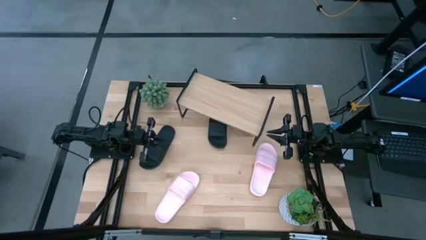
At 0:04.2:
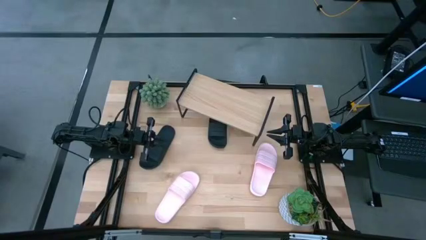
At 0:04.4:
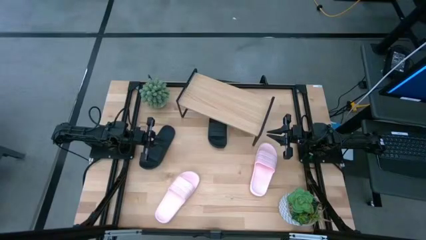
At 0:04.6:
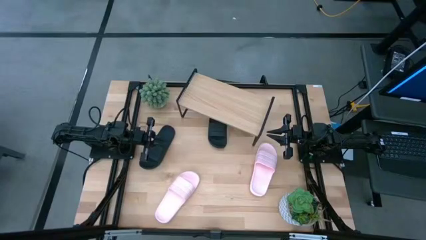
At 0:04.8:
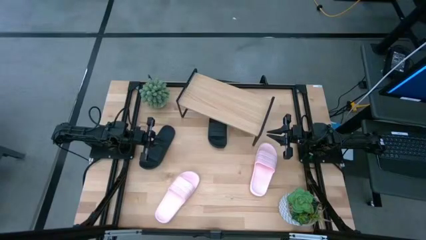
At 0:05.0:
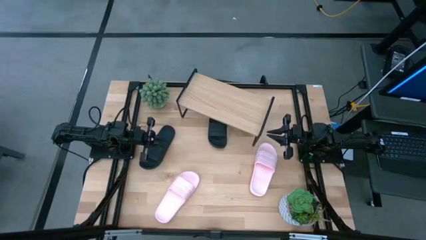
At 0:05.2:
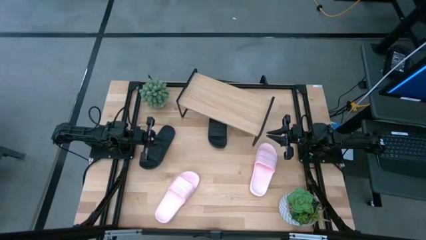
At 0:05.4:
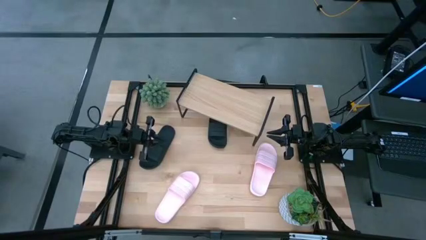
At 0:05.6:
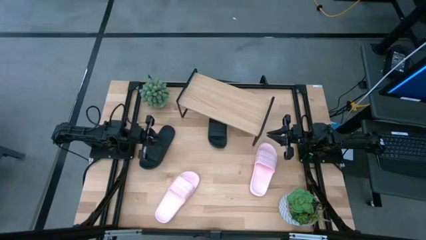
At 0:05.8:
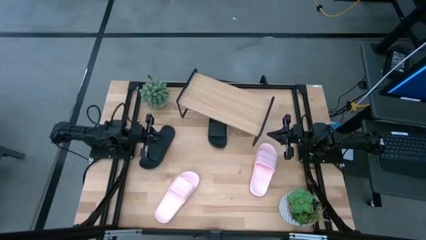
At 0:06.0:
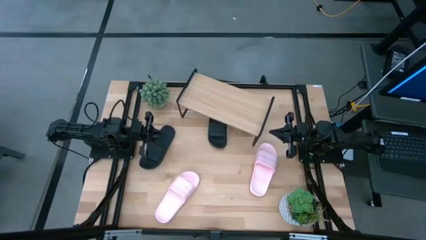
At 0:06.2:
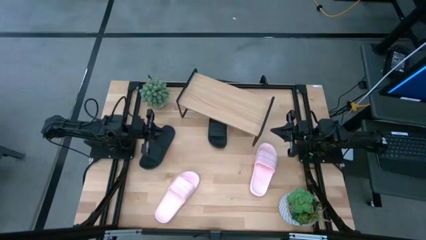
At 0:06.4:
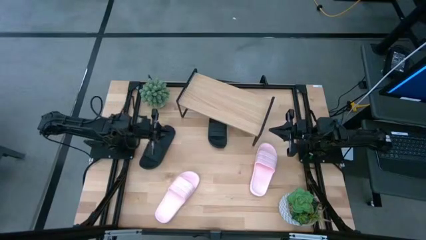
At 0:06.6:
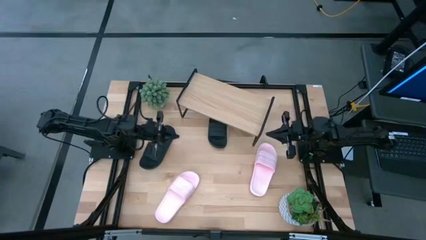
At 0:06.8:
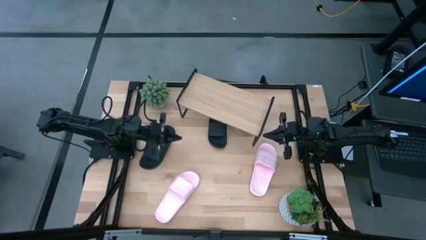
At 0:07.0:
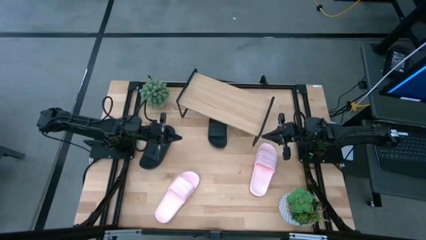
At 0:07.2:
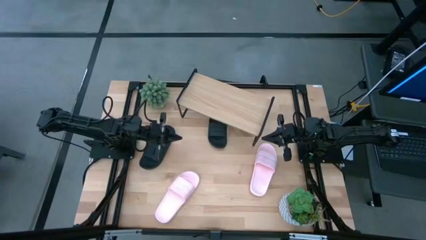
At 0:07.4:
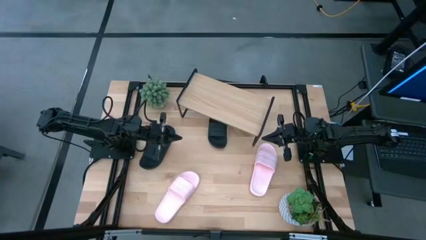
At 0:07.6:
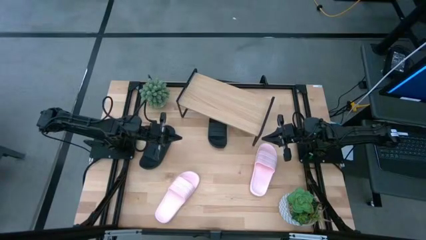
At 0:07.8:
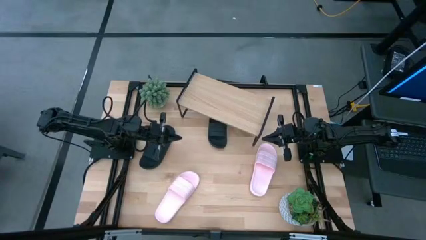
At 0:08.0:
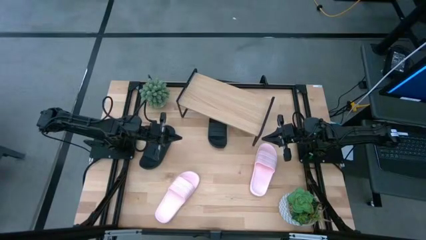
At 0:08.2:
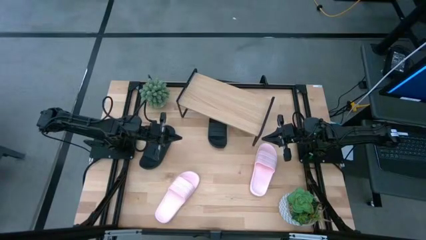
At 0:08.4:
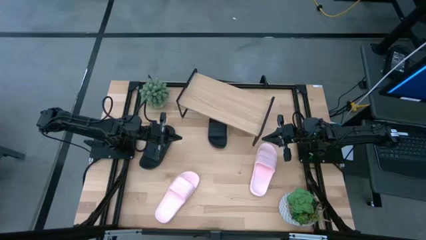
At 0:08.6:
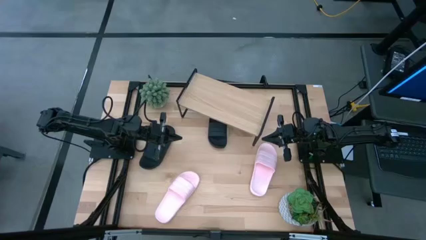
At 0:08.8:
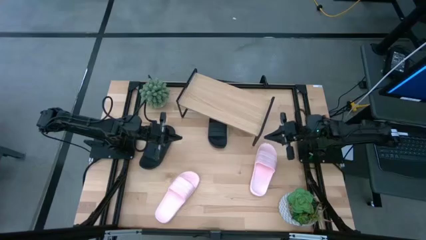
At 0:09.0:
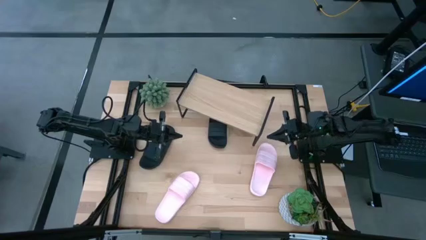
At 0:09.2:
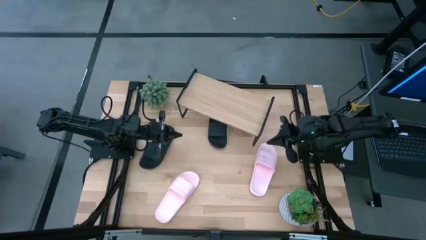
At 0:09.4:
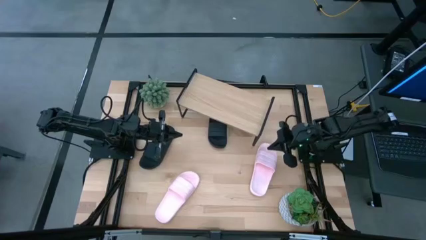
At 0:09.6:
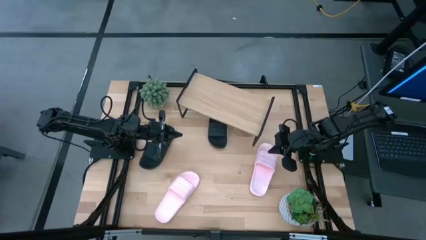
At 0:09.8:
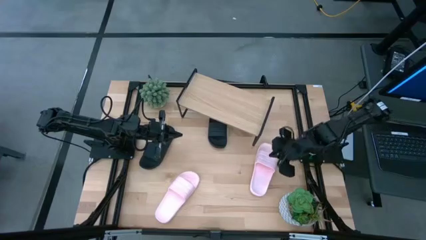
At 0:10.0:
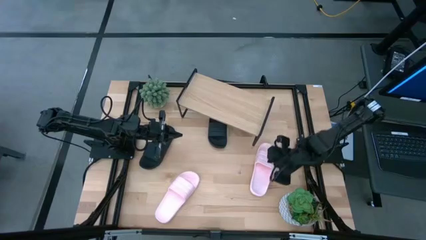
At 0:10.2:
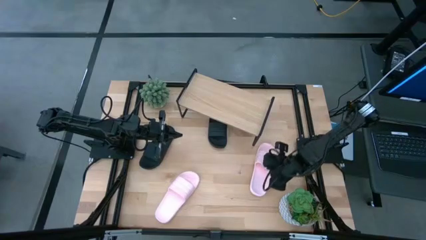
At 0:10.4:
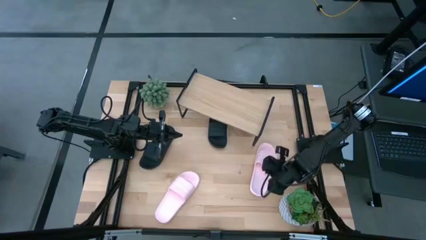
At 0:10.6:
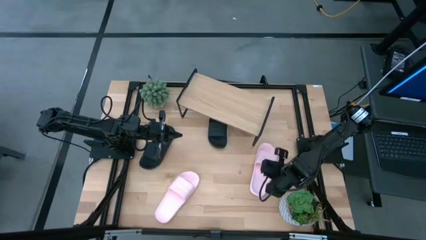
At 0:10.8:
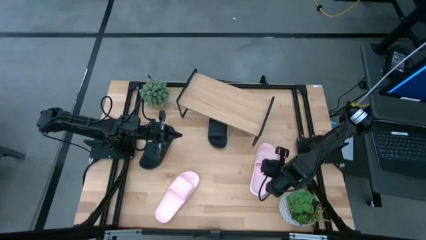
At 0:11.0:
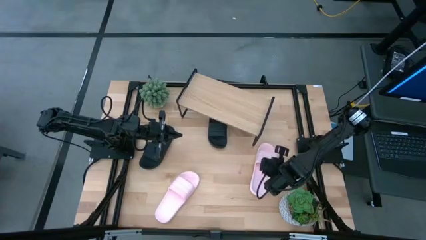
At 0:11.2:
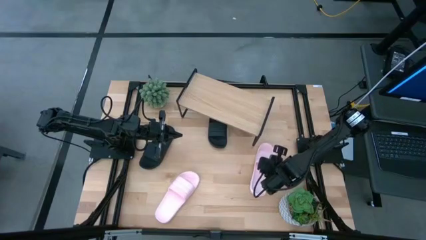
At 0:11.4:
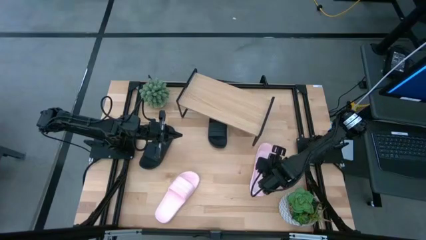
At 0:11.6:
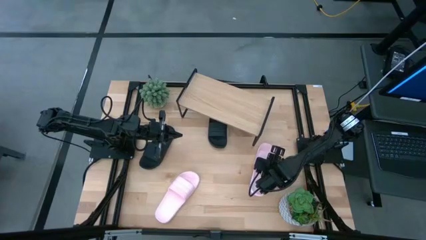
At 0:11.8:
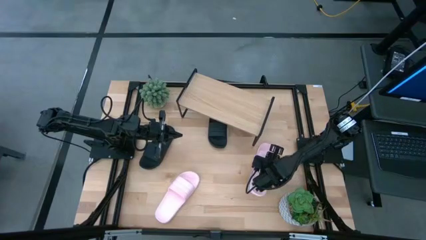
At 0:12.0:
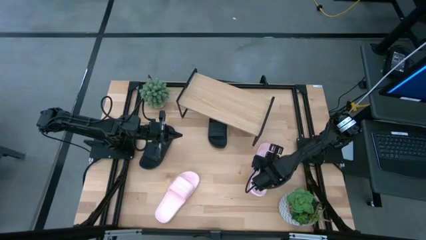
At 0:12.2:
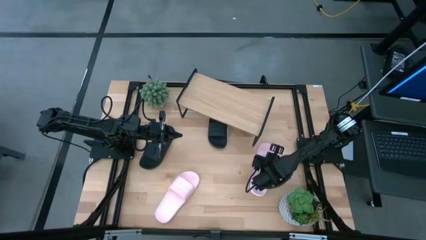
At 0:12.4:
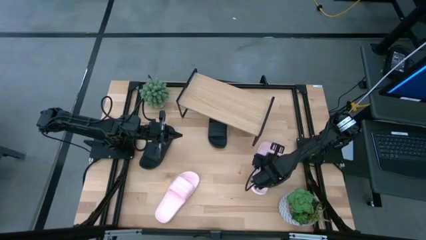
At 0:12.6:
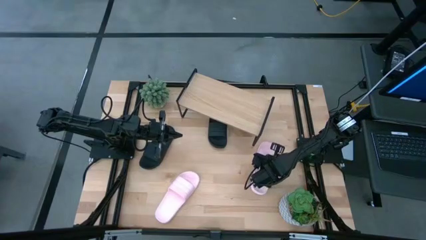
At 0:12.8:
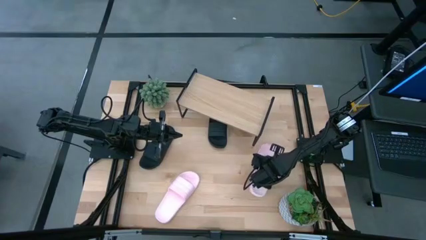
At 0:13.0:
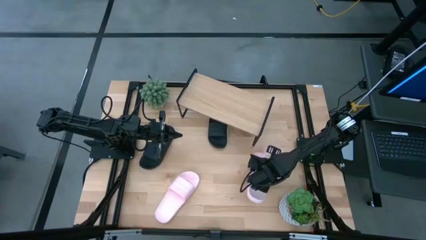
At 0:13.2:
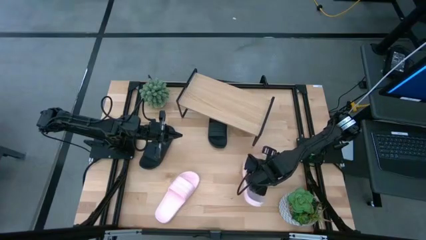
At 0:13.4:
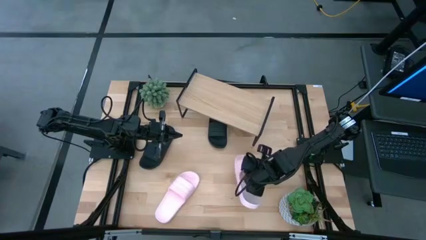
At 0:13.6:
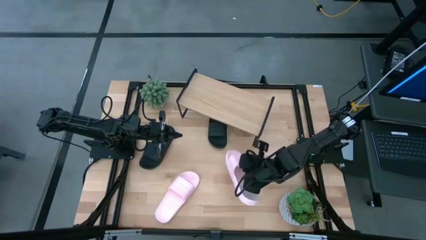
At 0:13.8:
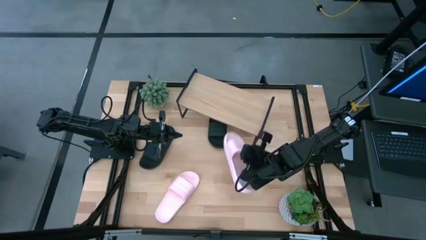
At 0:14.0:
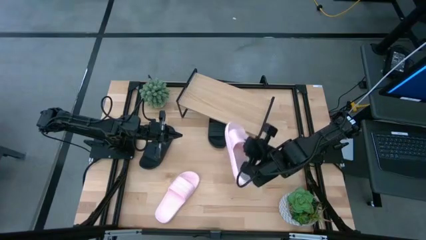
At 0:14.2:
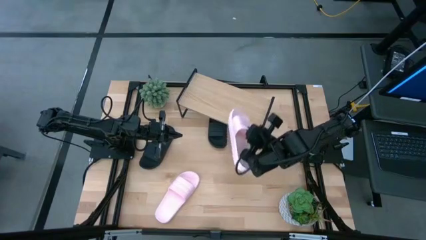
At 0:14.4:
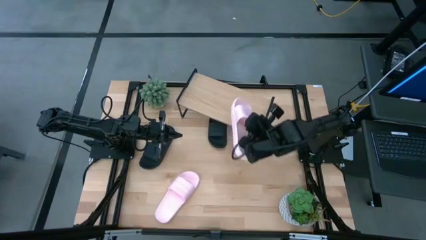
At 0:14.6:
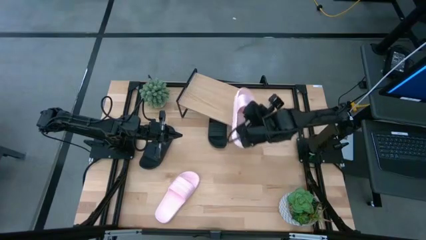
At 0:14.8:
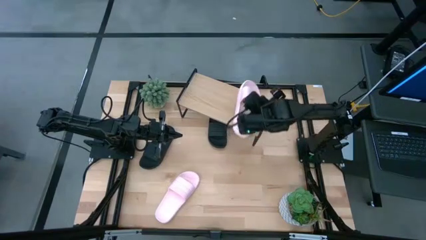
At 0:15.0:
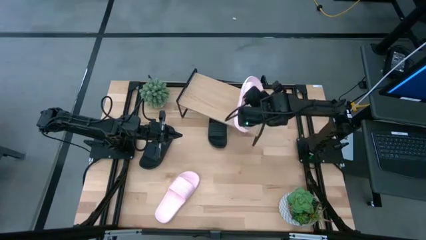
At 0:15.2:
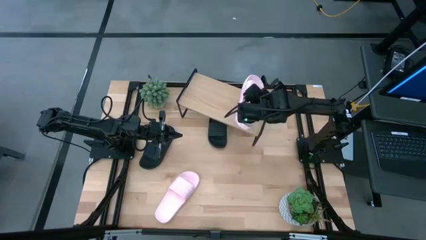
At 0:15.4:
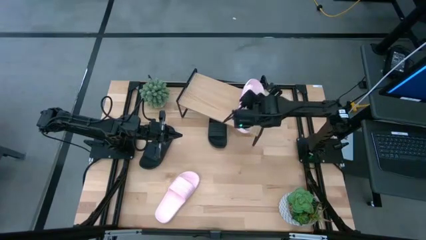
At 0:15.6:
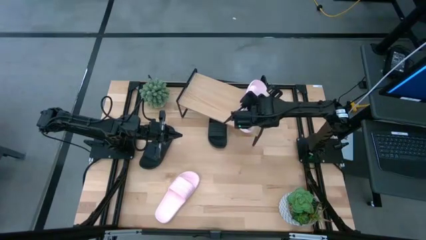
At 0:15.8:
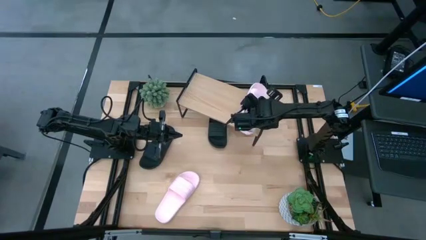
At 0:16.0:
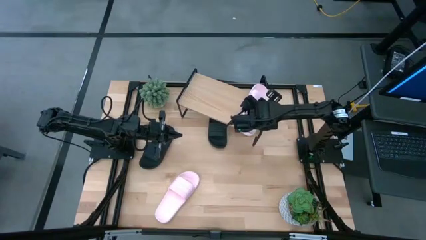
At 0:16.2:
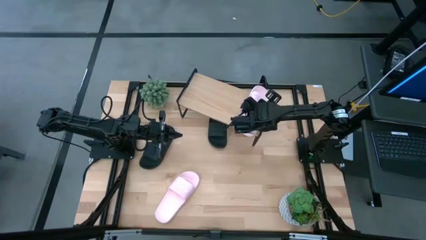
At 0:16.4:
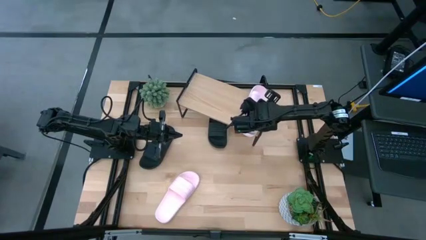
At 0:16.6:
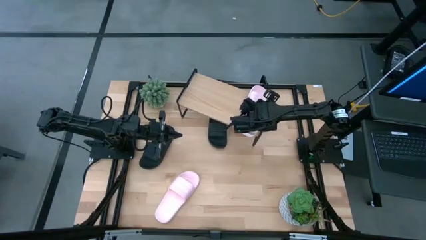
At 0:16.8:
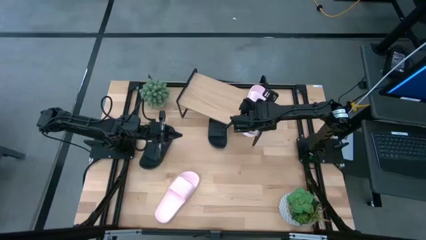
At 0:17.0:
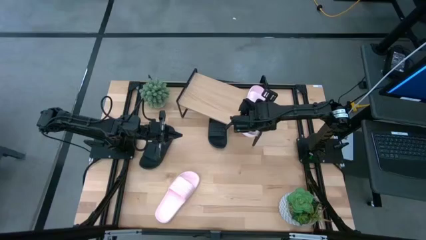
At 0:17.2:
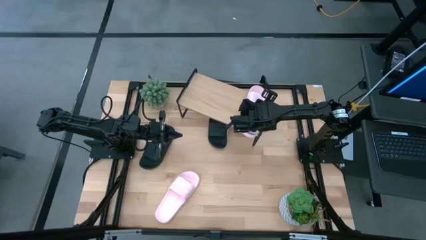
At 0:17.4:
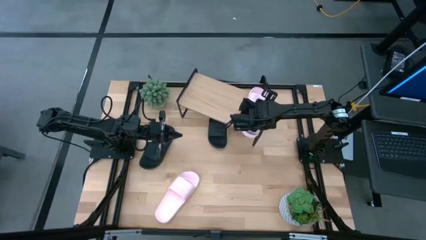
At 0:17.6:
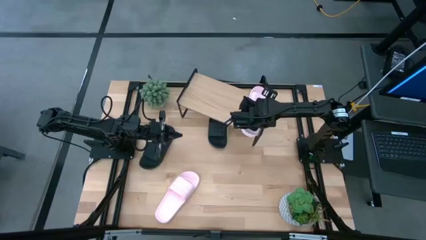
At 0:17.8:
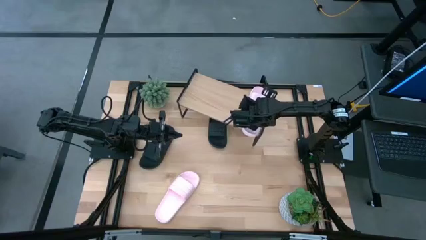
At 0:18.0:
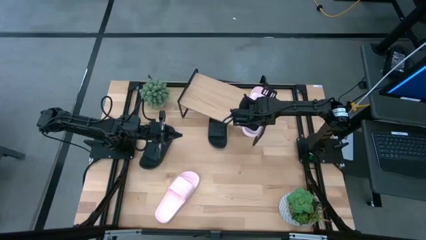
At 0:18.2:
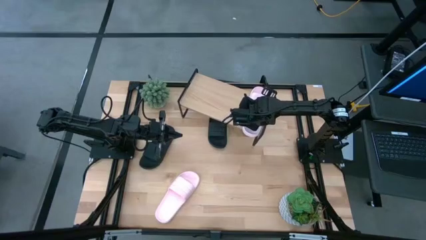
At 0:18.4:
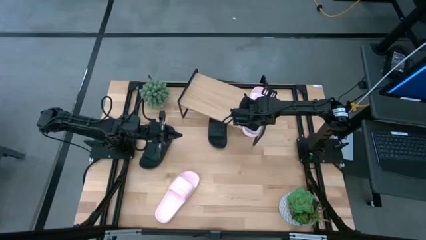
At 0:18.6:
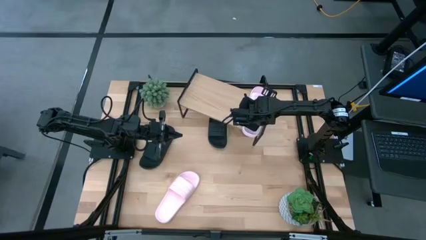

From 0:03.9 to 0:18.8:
Task: Pick and place slides into the shelf
Put the right white slides on the shelf
